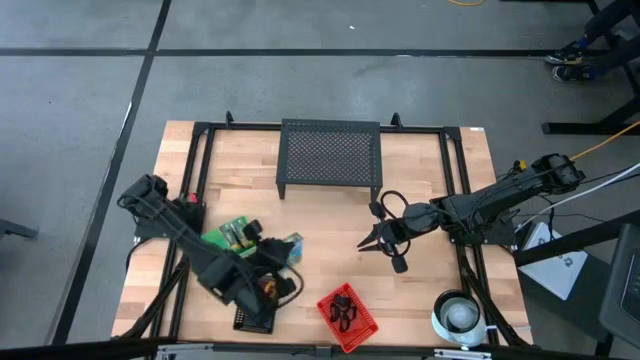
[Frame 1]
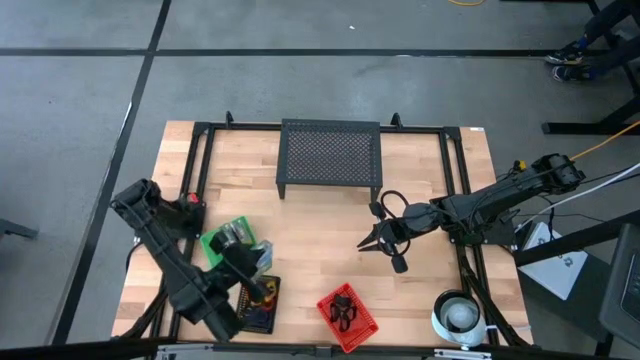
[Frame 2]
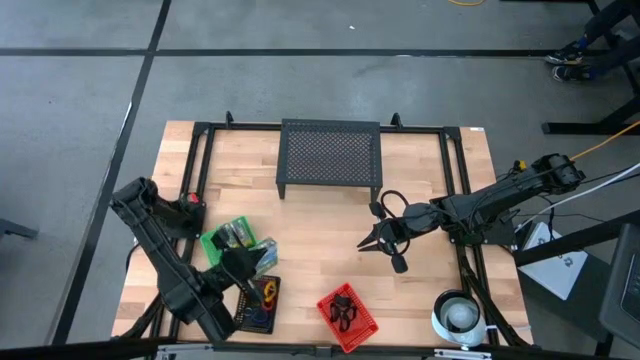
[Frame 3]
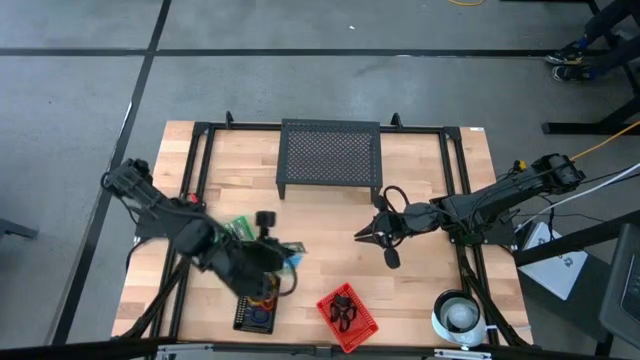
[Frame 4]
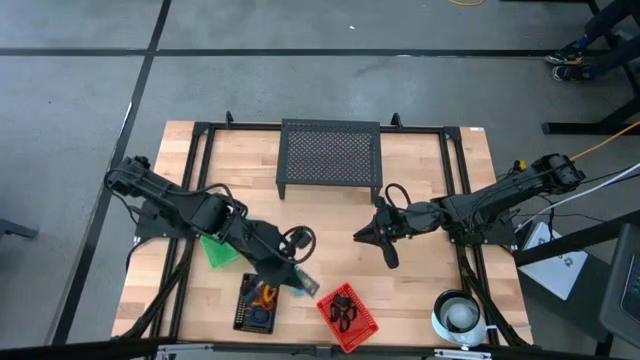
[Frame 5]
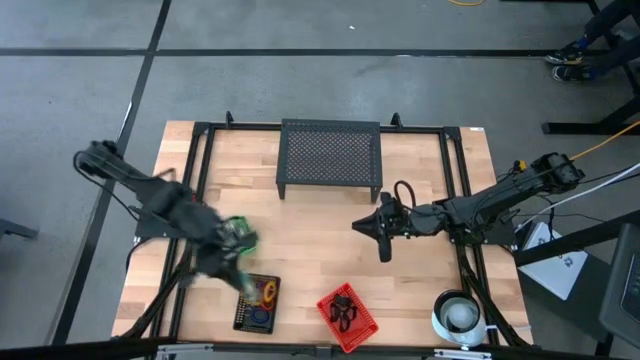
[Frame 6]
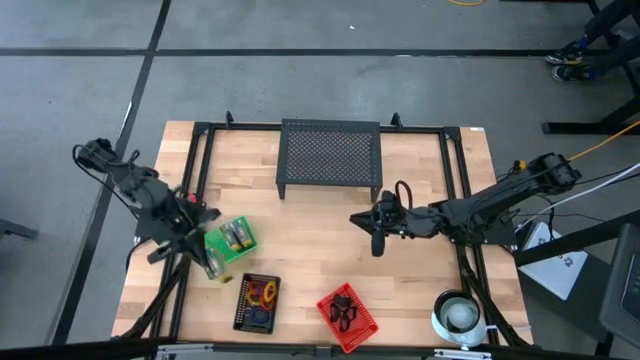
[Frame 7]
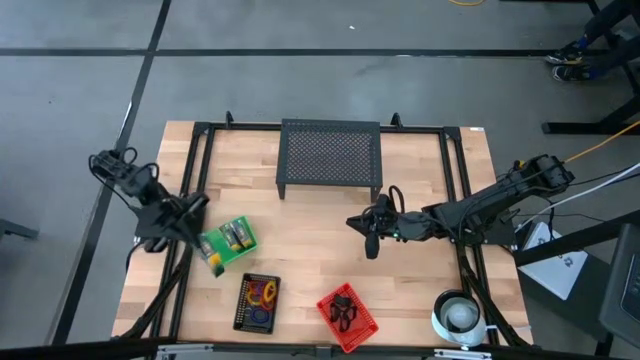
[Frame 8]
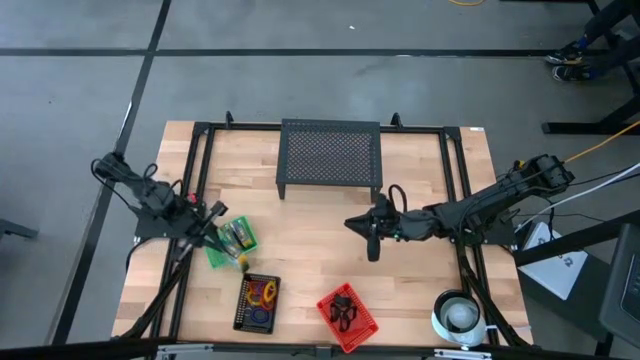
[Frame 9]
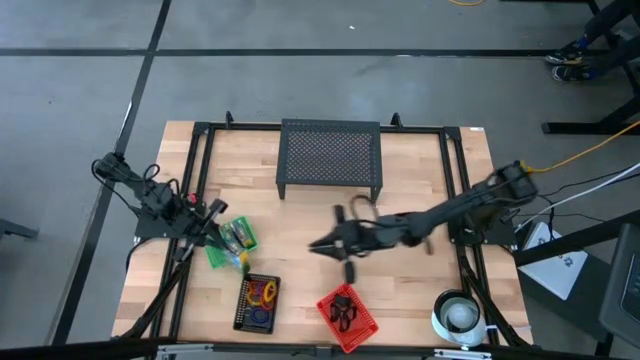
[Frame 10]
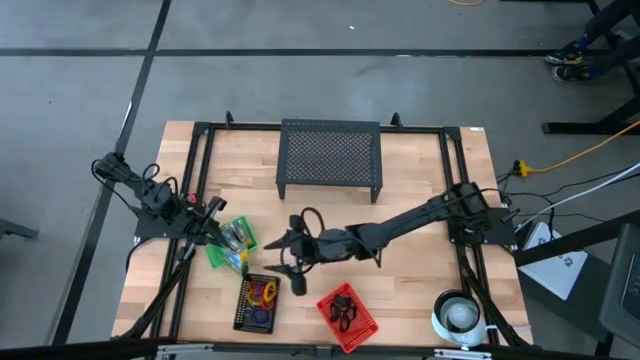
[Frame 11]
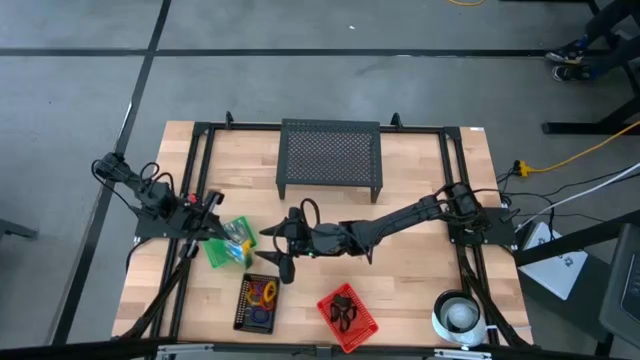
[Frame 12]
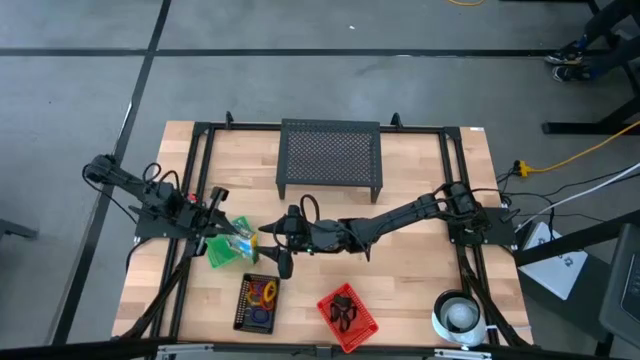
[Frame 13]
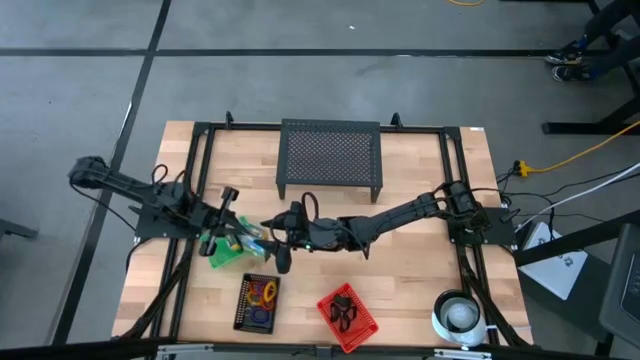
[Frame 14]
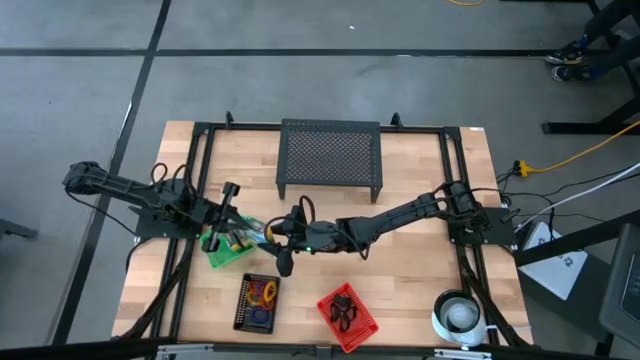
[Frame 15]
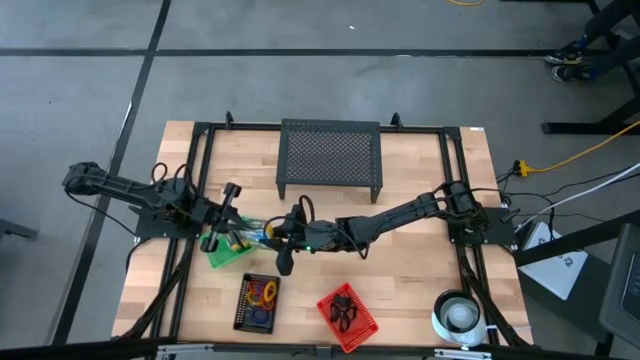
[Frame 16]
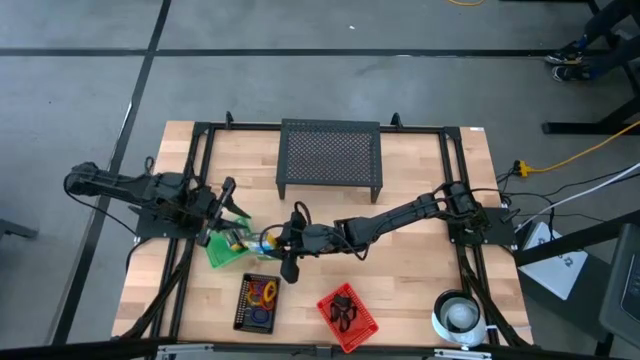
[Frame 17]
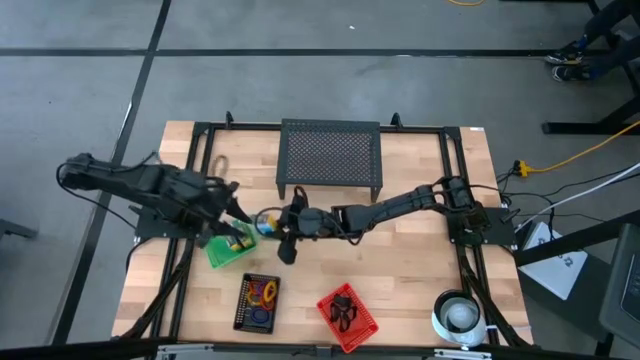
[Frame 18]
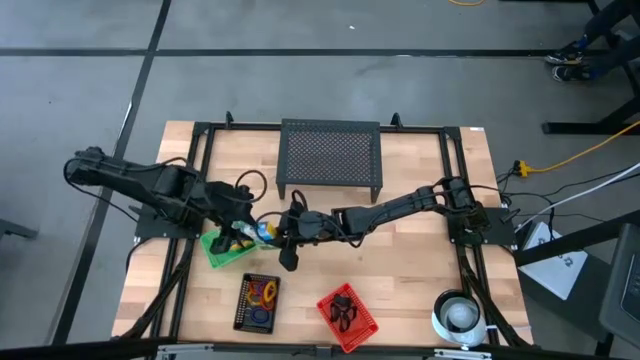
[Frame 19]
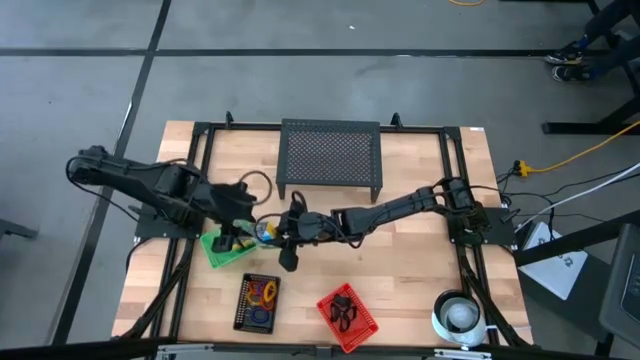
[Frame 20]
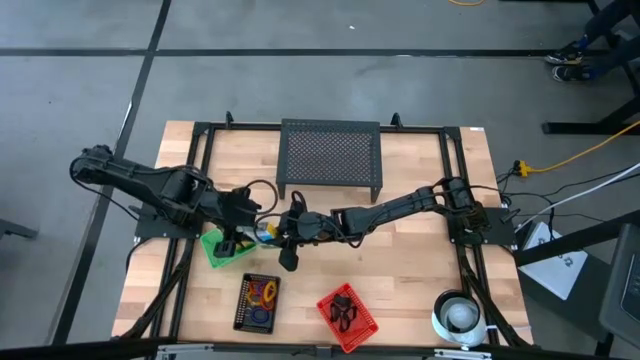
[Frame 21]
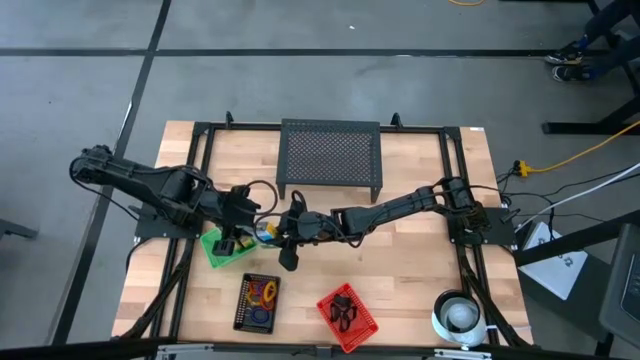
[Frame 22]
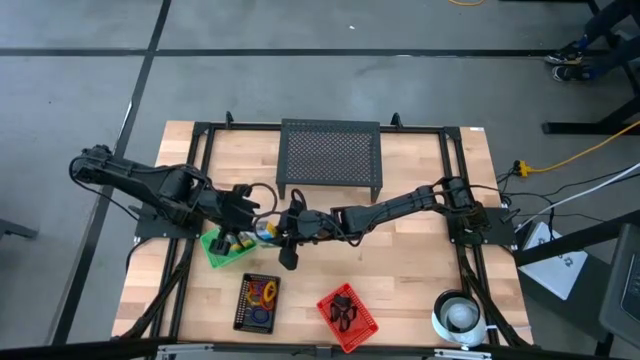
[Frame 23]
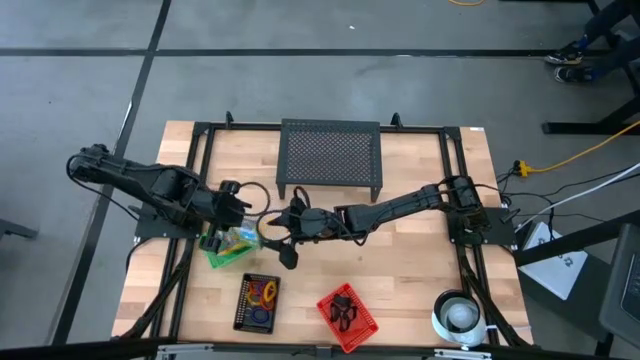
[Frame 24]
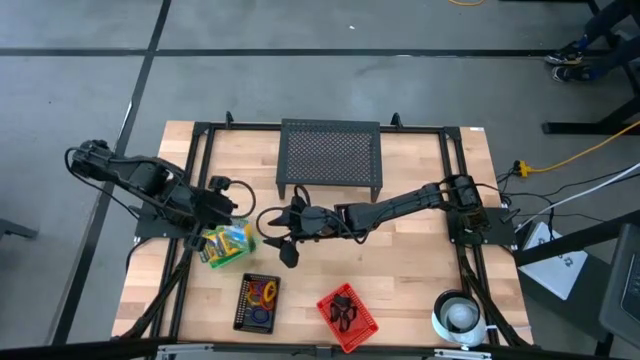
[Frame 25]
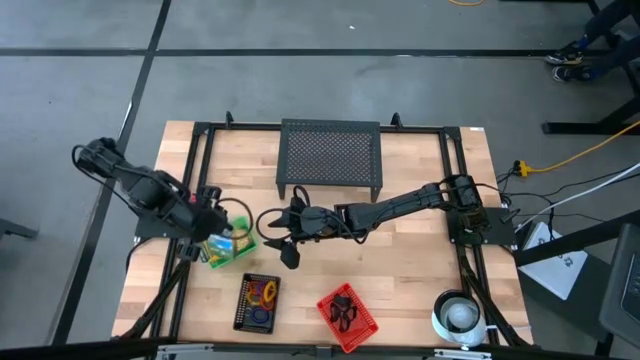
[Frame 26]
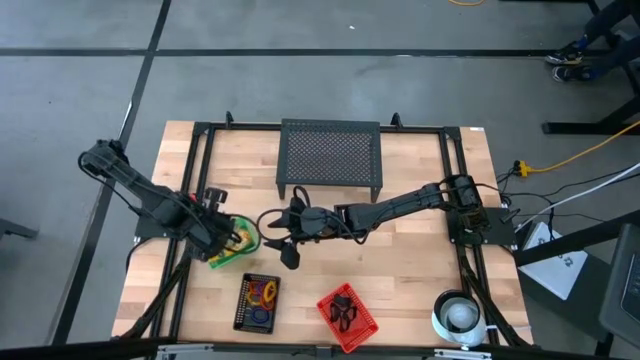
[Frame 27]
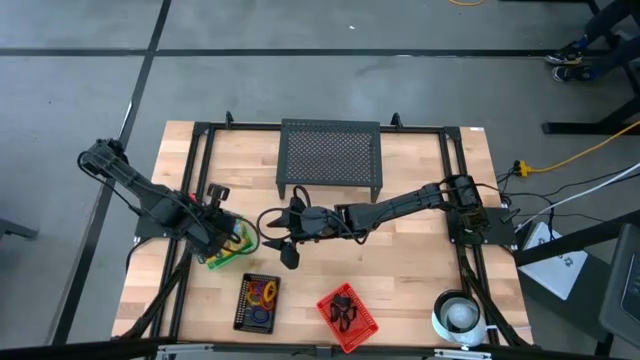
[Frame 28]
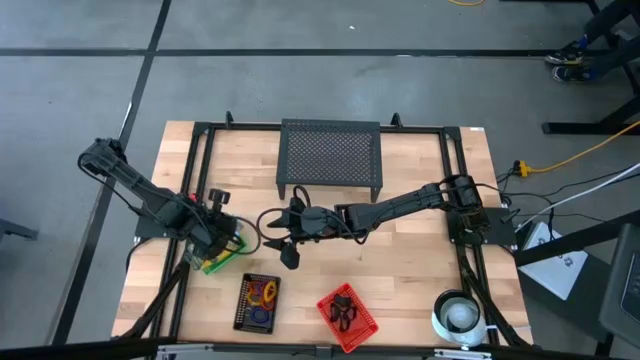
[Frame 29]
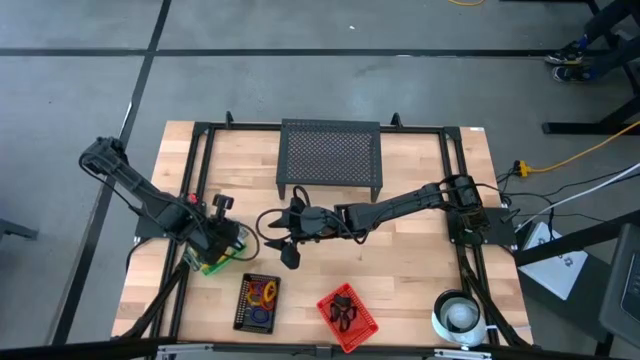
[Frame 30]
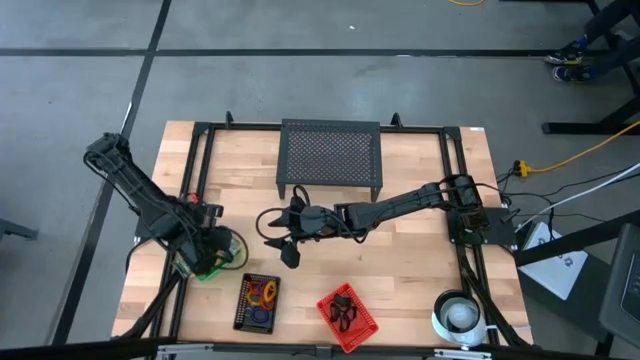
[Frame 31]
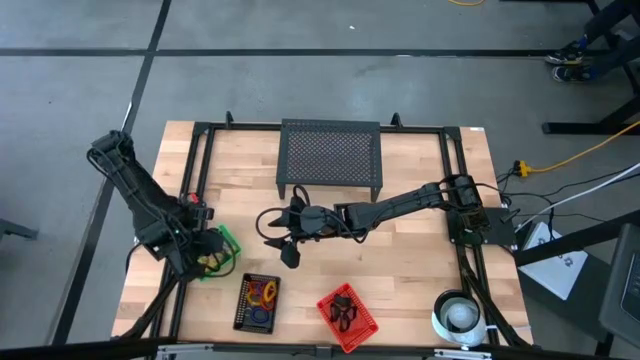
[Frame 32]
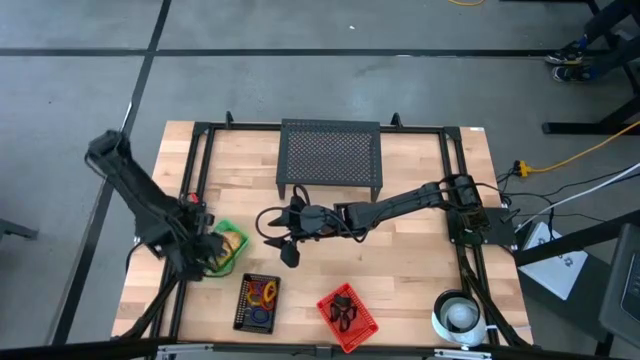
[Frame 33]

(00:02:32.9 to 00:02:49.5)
Task: Pick & Place Office Desk Supplies
Put the yellow crayon box into the green bin

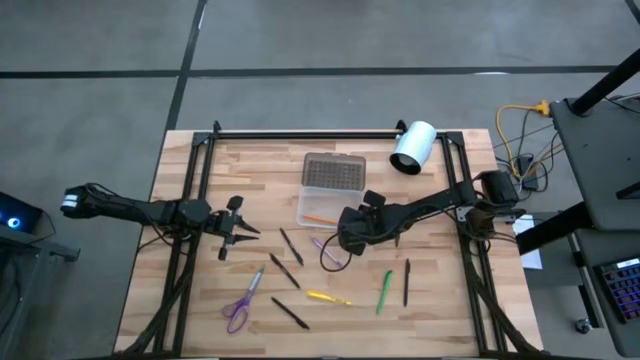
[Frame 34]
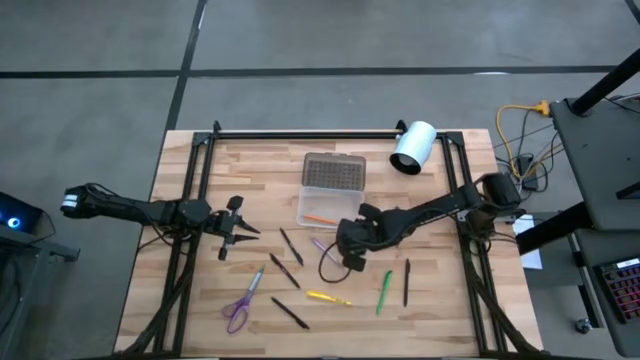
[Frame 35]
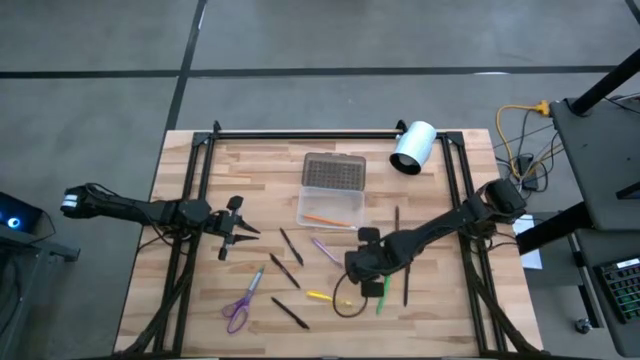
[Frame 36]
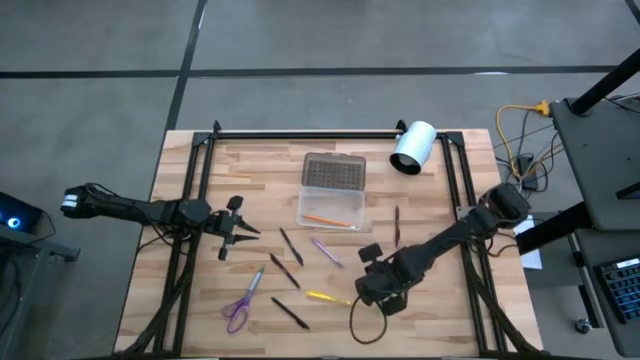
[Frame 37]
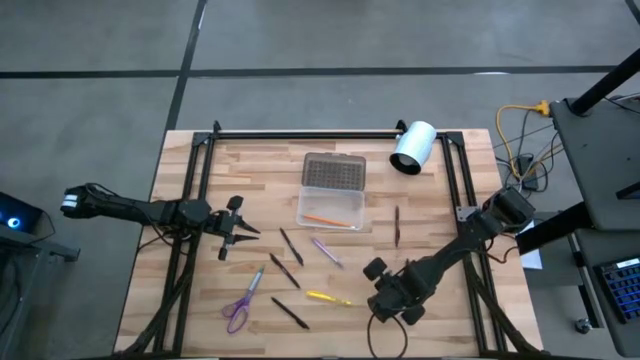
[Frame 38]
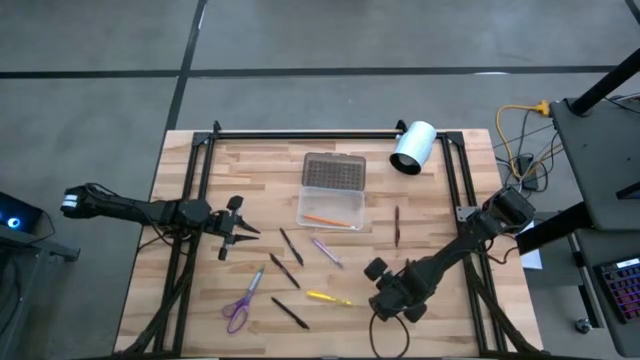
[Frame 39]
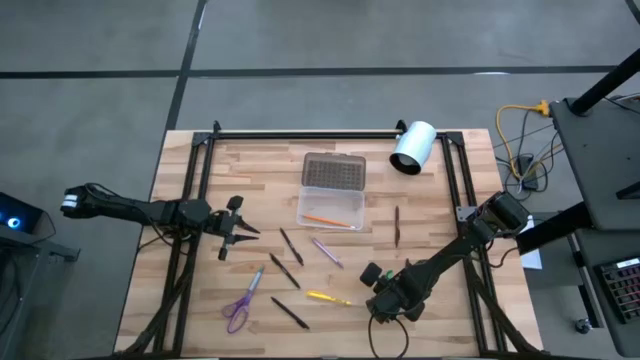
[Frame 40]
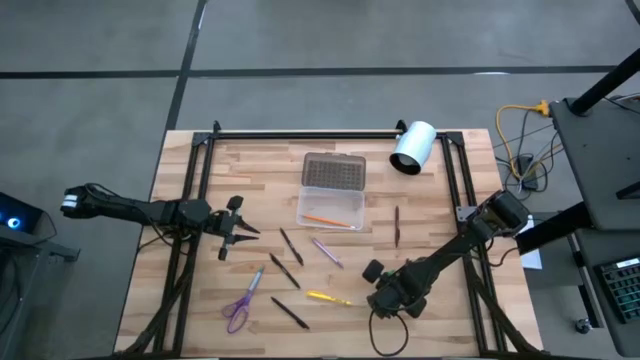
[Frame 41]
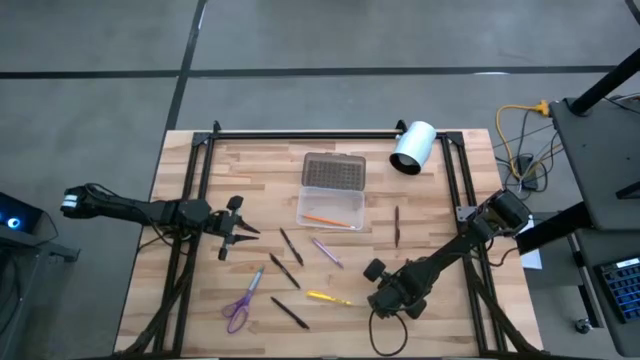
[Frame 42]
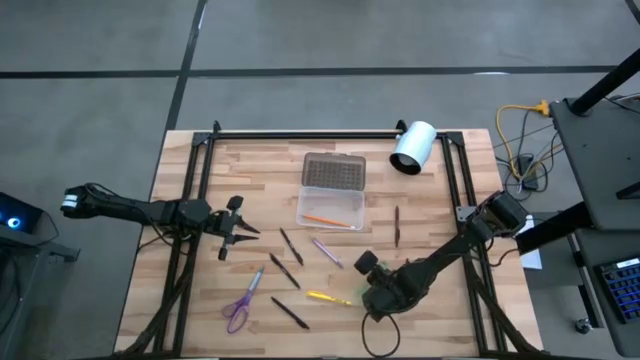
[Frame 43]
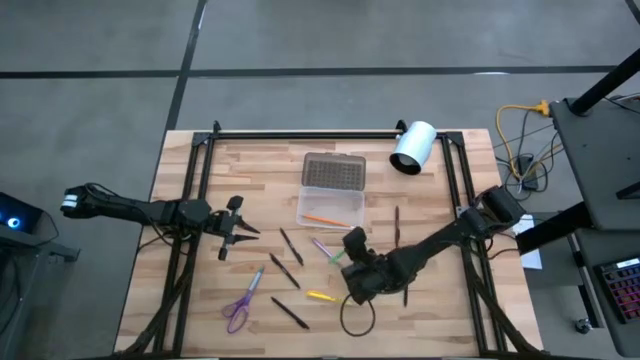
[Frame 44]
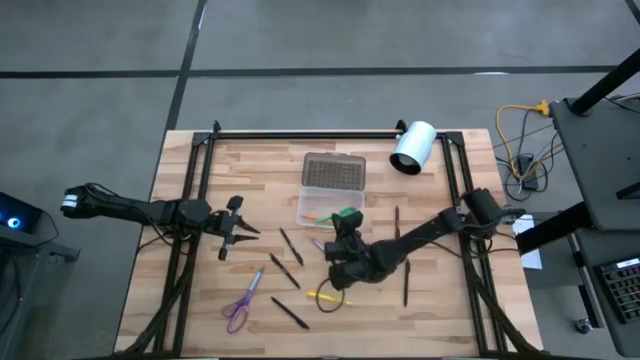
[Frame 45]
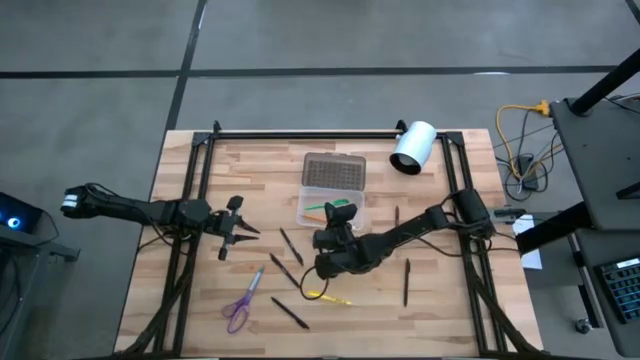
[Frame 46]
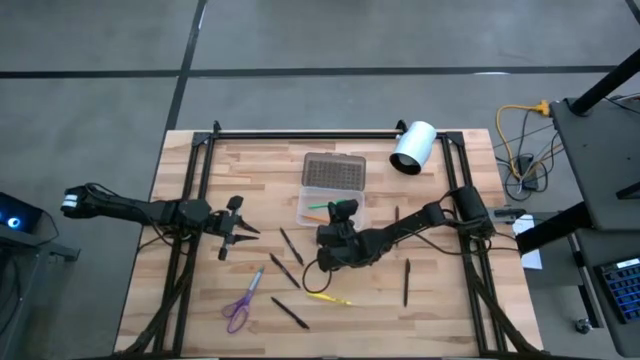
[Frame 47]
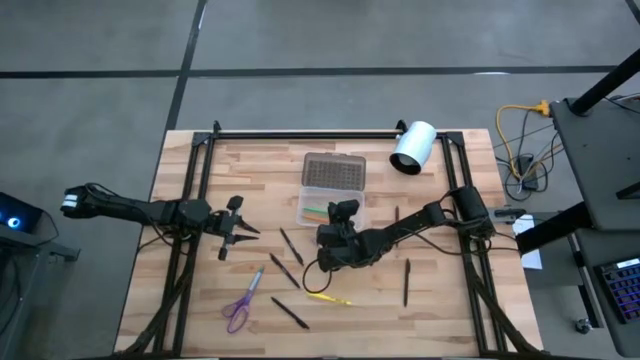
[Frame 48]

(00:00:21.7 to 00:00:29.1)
Task: Pick & place school supplies into a supply box
Put the green pen into the black supply box
